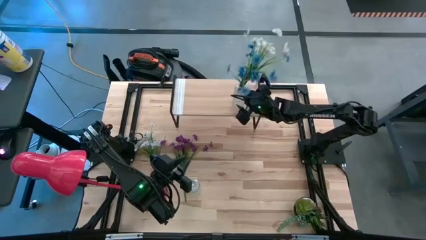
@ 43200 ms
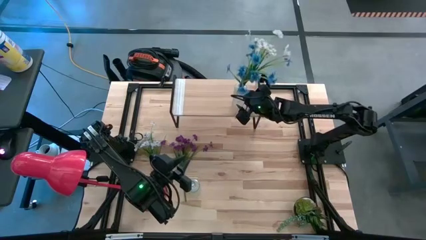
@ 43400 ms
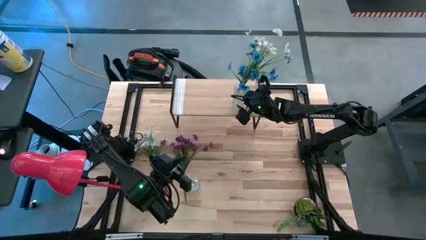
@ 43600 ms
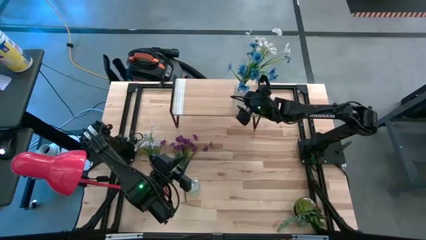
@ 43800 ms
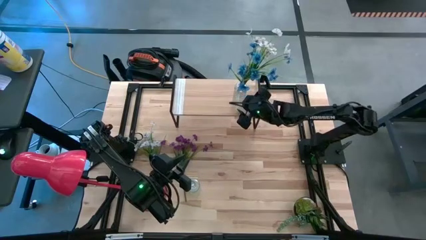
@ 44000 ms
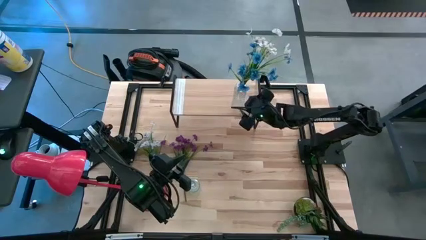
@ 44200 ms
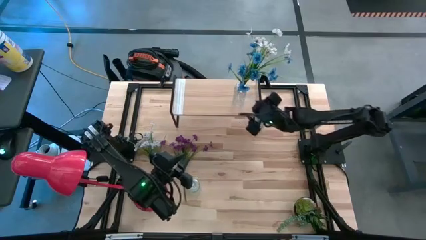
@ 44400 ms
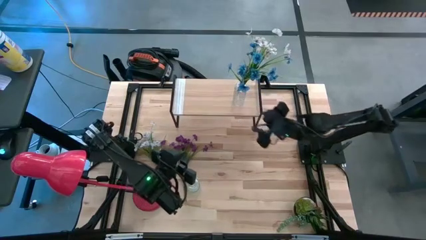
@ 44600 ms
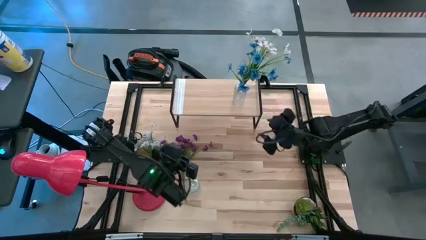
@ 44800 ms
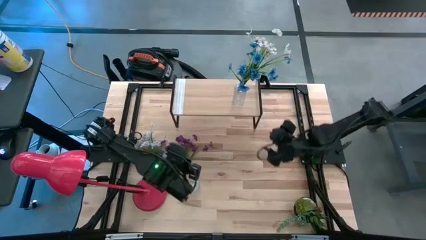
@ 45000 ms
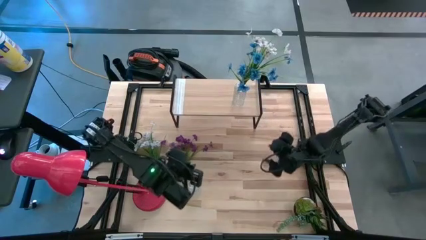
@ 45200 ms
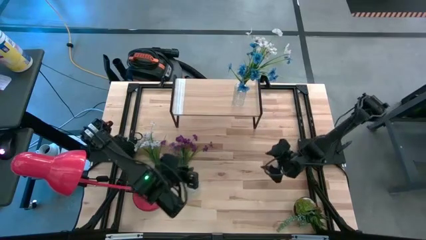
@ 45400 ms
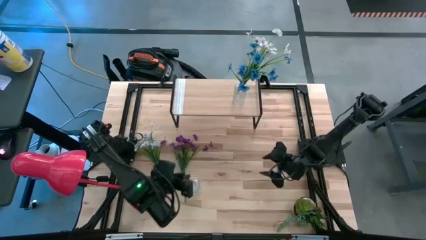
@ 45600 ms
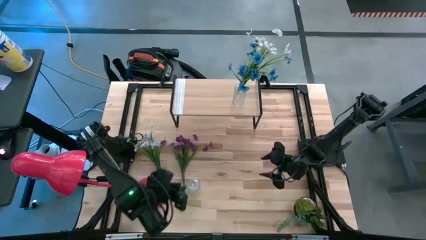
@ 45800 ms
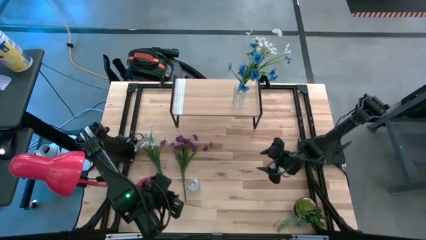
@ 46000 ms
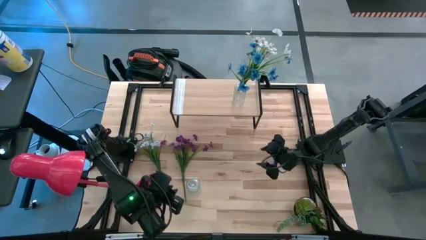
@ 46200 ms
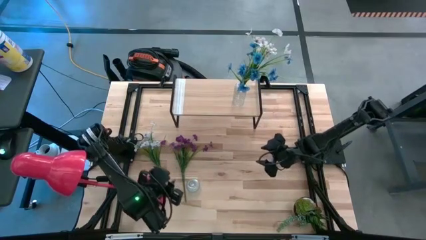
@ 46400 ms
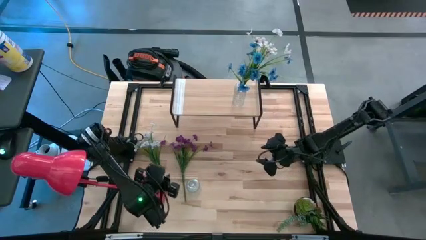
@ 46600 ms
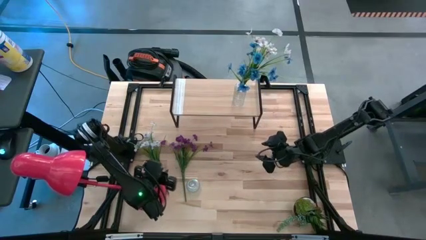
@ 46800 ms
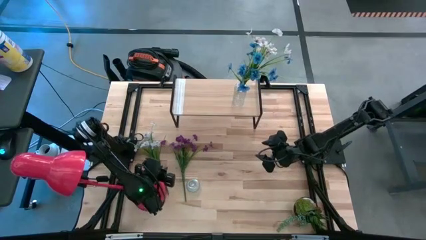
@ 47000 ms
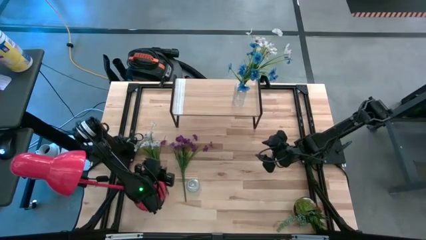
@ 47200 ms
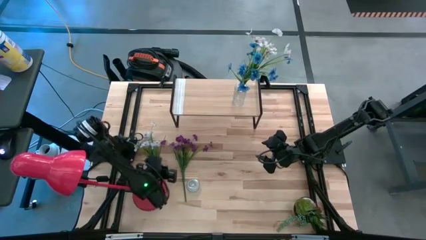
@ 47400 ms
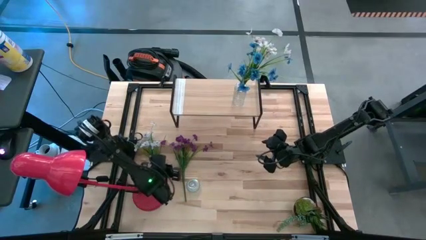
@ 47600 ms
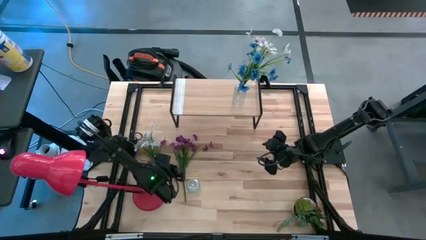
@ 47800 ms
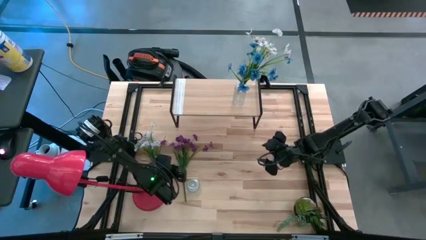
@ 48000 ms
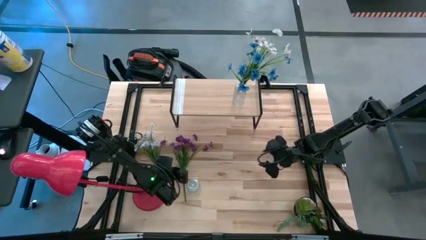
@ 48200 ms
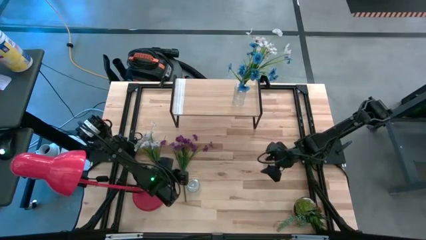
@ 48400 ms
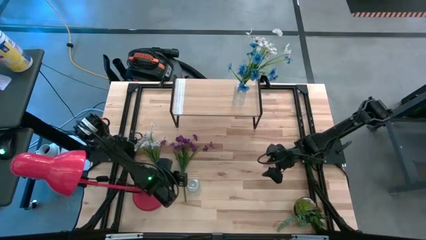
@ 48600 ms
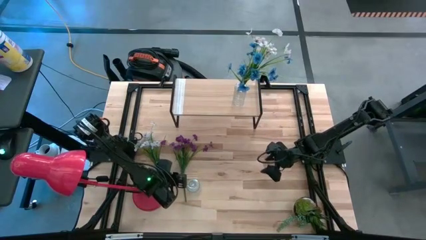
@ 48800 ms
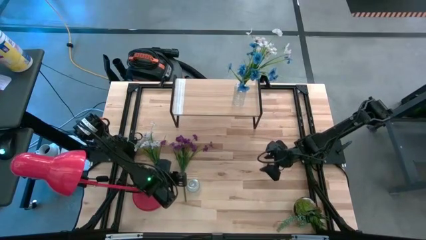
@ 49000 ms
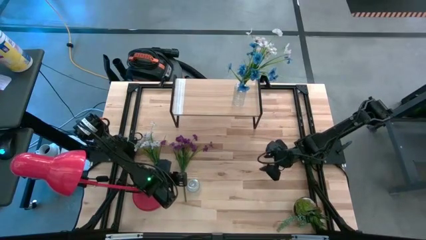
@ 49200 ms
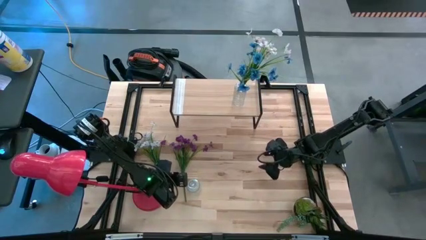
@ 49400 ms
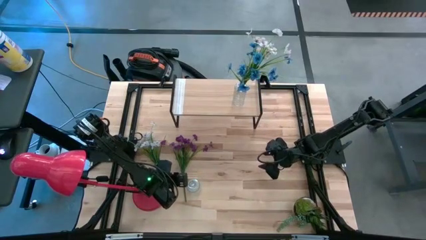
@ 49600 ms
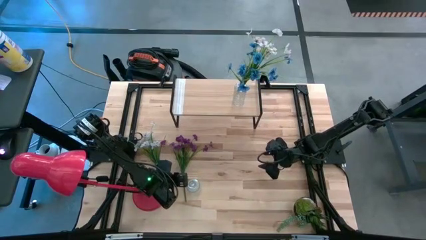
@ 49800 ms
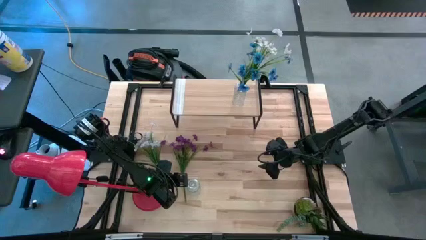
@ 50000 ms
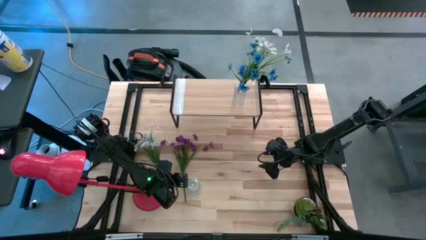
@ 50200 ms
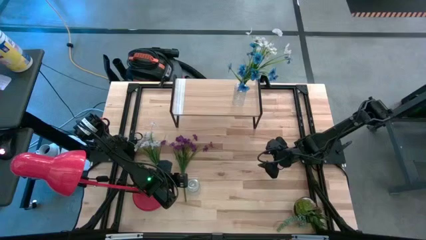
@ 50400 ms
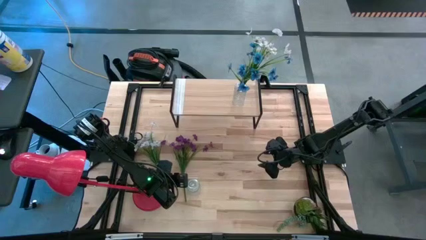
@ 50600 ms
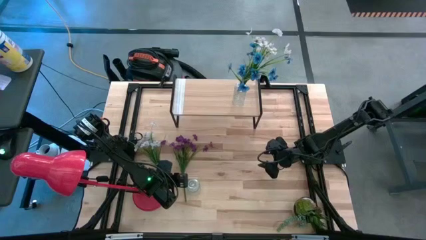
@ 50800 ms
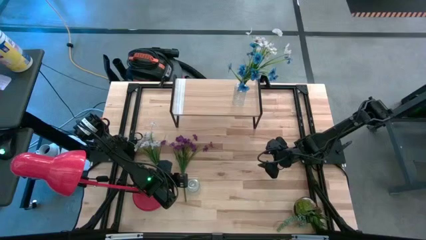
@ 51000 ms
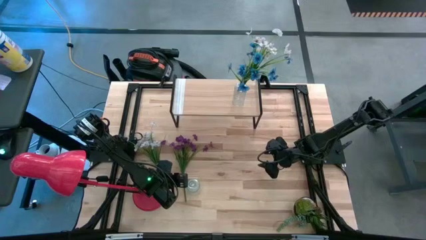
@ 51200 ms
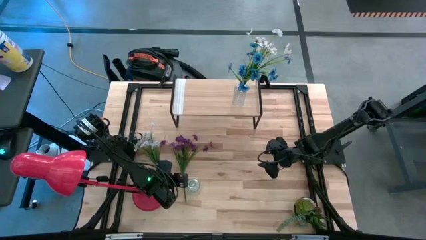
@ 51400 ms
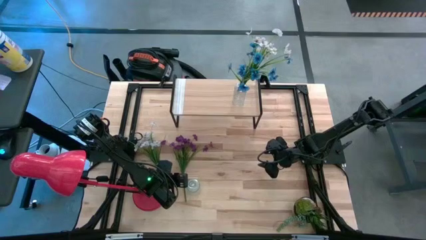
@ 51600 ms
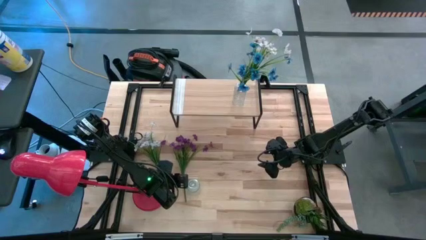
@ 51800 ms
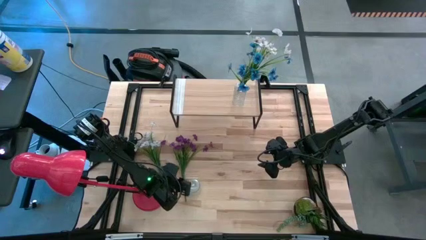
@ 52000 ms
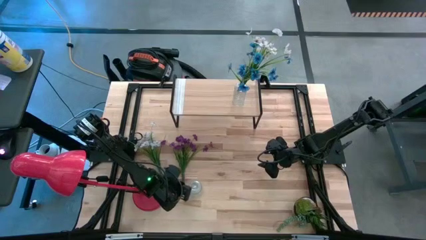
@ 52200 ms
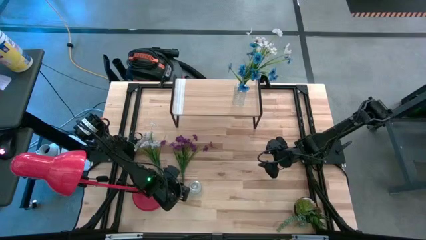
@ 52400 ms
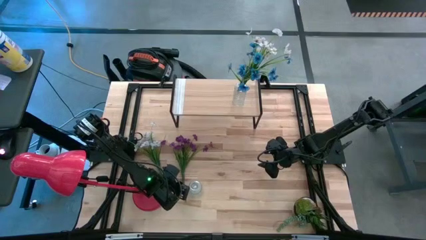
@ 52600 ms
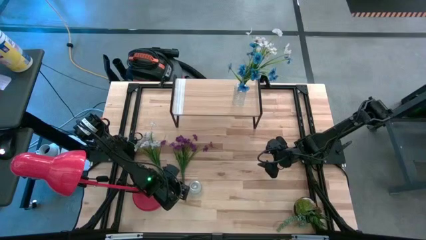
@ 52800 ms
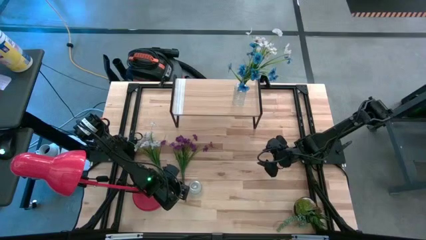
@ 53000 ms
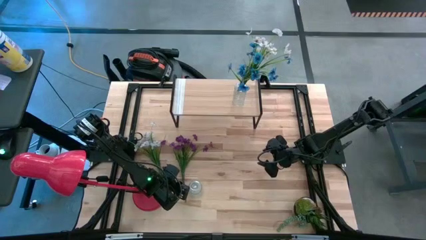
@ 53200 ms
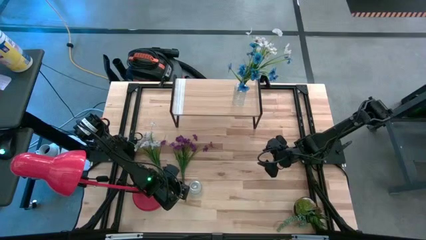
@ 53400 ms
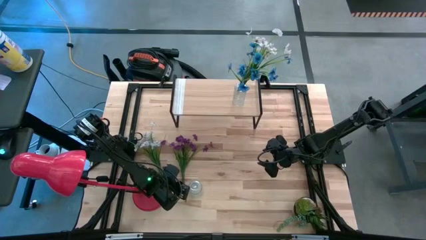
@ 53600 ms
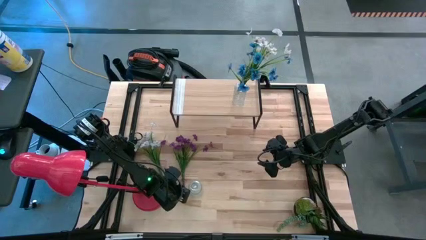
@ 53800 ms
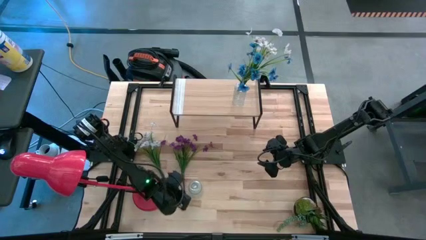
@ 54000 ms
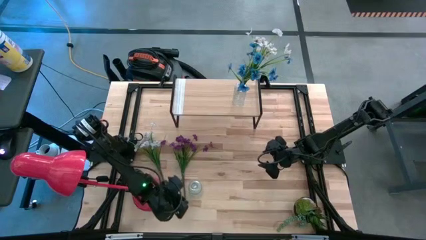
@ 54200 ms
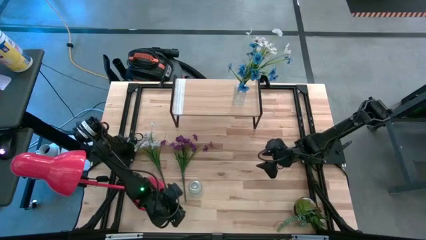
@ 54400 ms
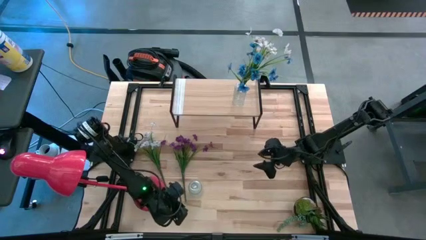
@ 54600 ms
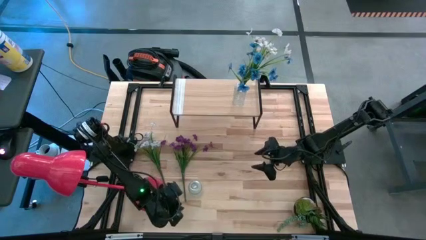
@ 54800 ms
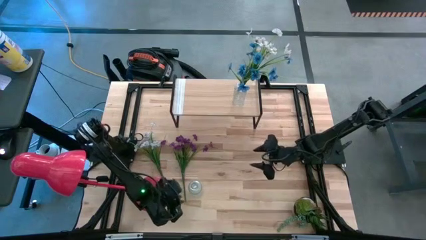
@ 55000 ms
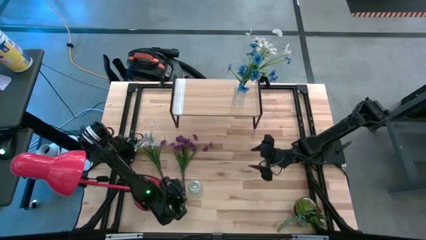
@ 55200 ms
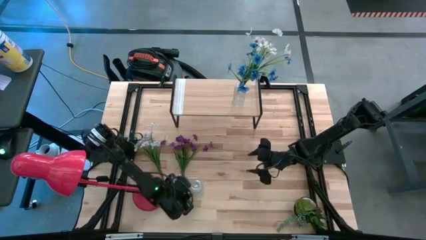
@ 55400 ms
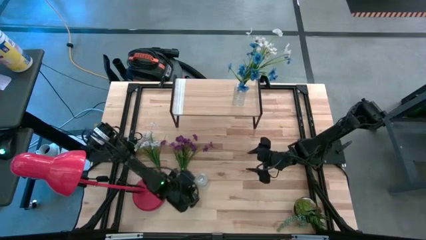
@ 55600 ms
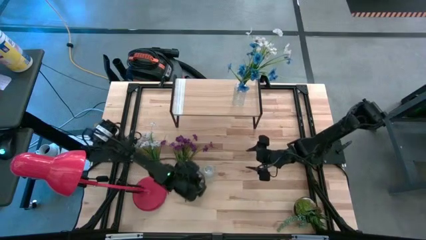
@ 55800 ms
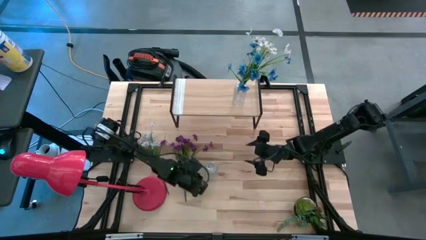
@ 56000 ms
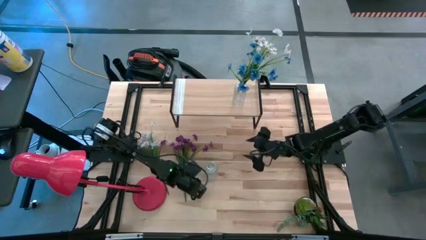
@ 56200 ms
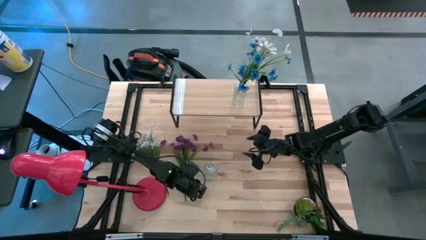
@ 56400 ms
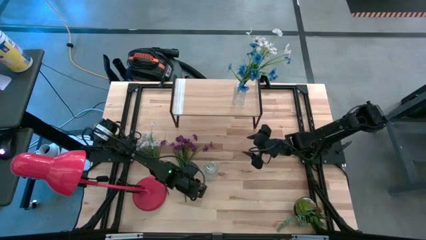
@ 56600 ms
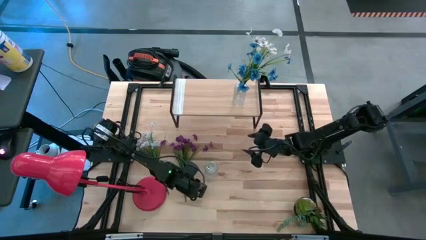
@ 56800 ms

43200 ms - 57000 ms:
Task: Pick and place flowers into a vace then onto a shelf
Put the violet flowers into the transparent vase
